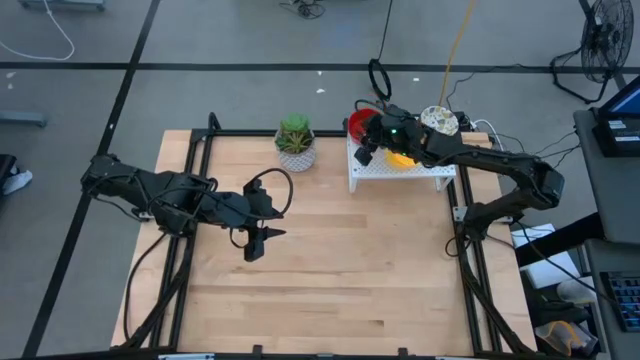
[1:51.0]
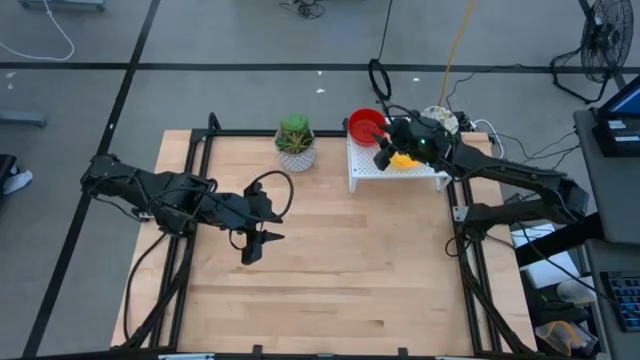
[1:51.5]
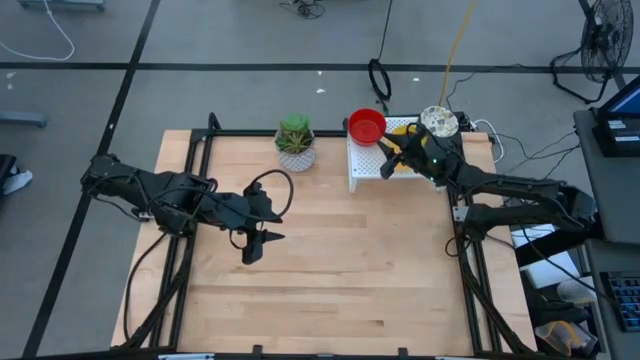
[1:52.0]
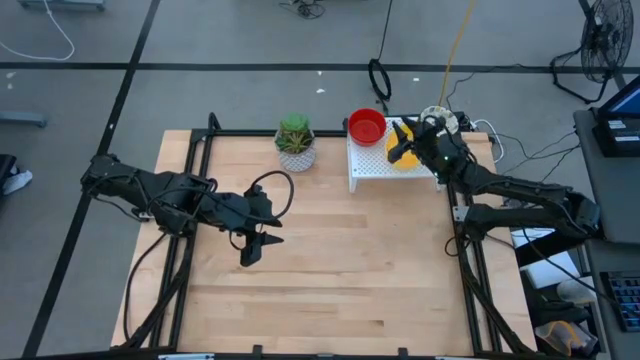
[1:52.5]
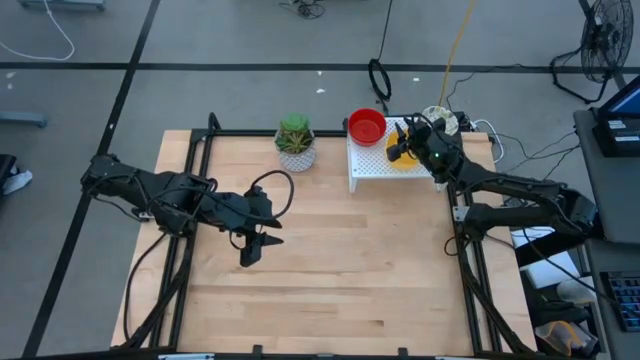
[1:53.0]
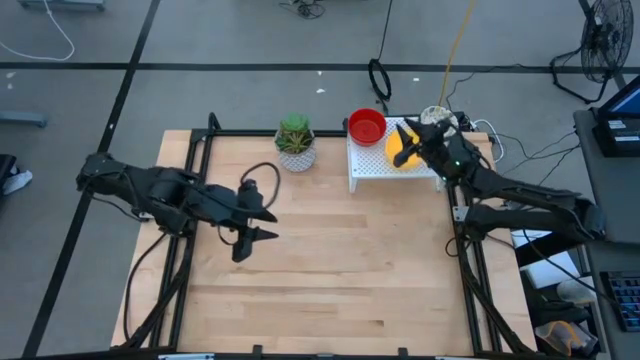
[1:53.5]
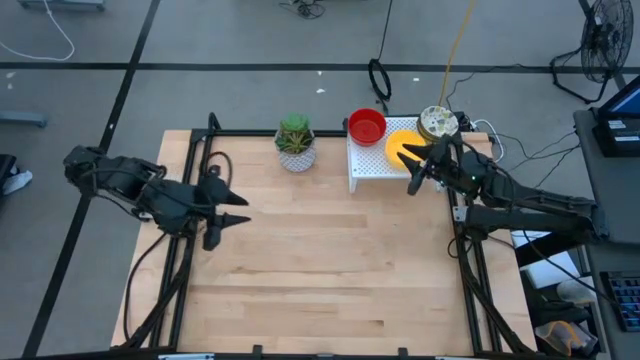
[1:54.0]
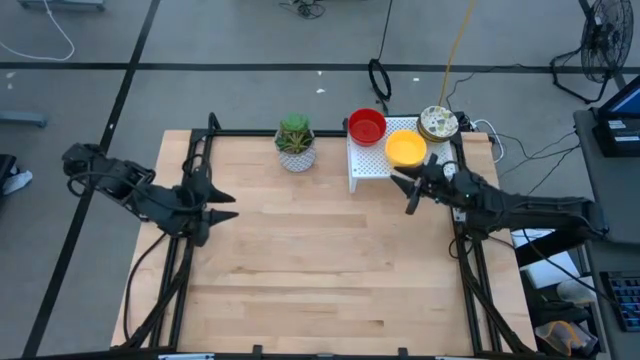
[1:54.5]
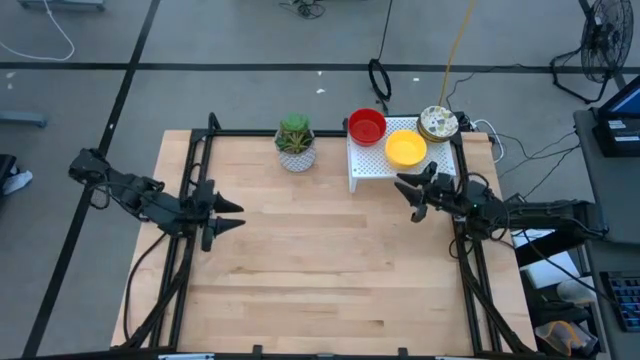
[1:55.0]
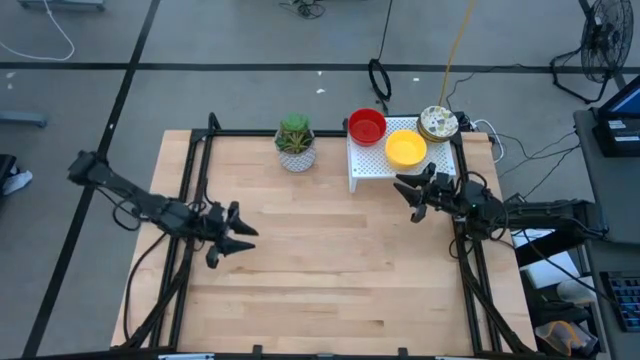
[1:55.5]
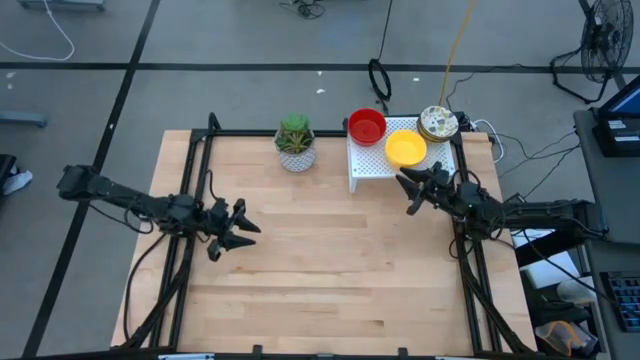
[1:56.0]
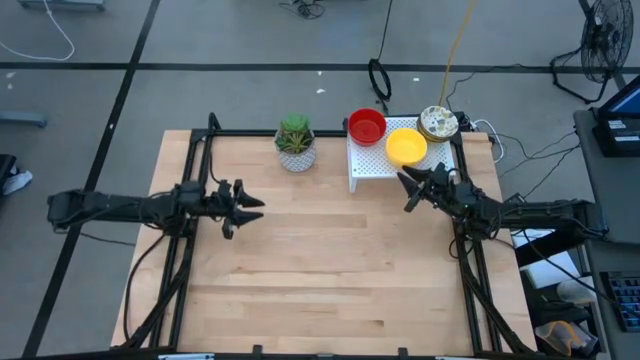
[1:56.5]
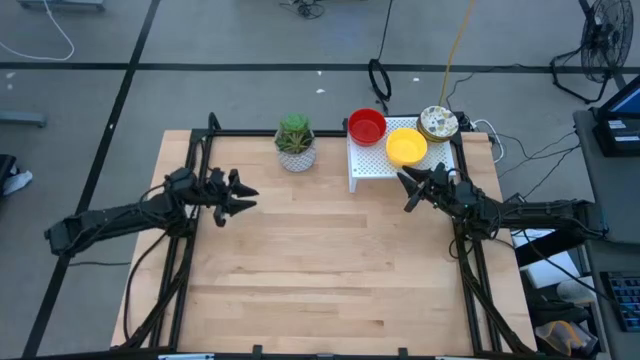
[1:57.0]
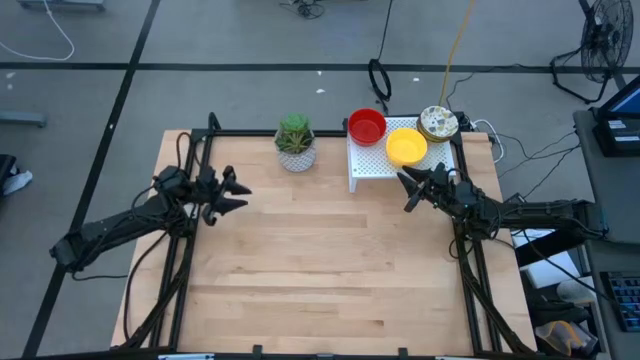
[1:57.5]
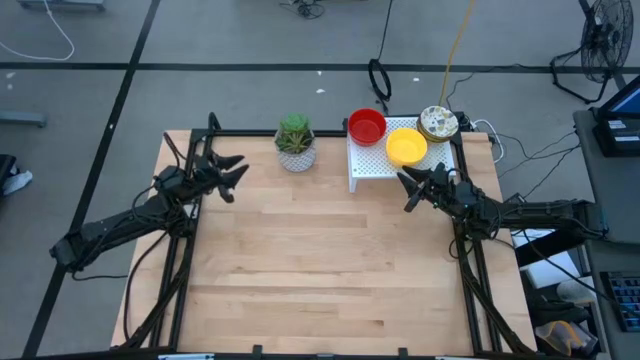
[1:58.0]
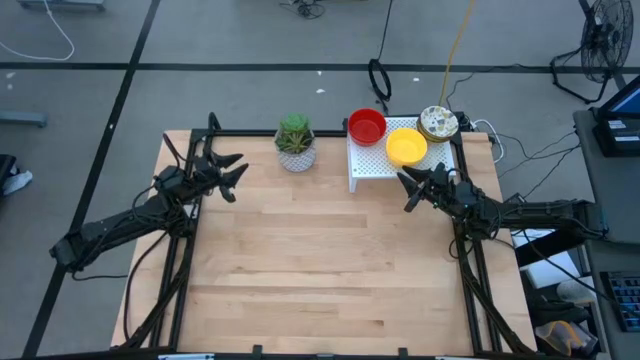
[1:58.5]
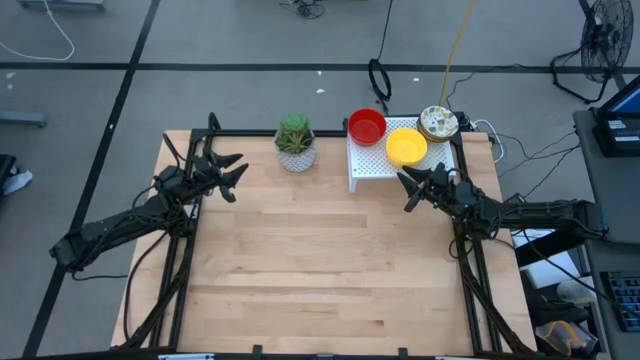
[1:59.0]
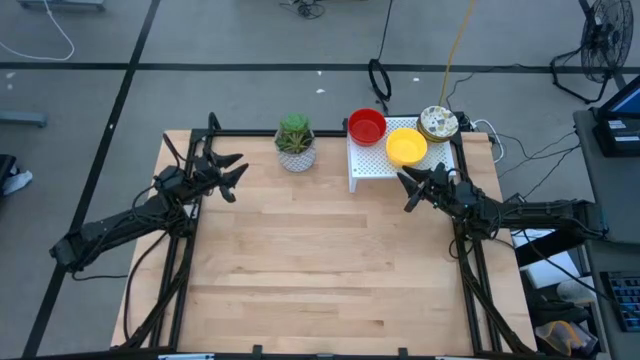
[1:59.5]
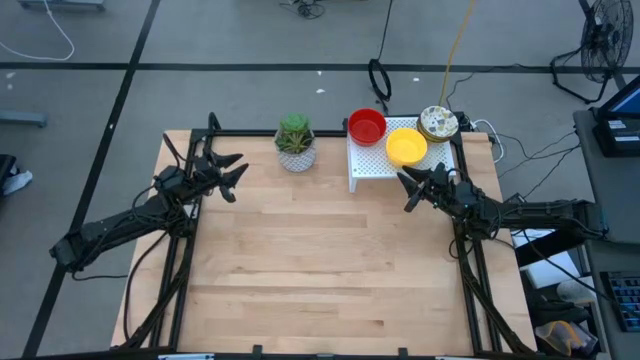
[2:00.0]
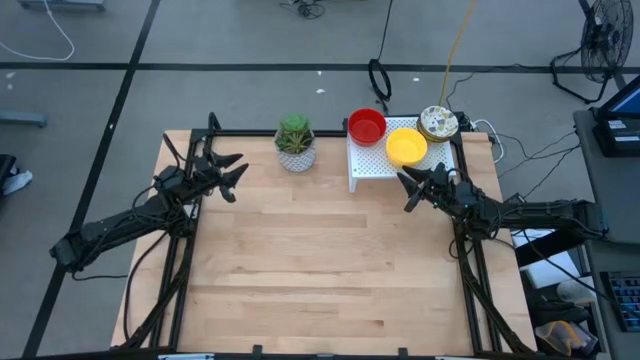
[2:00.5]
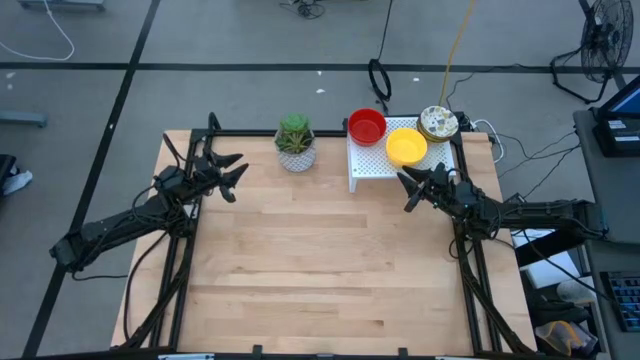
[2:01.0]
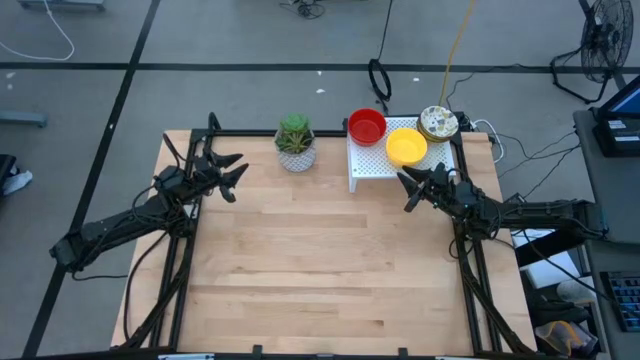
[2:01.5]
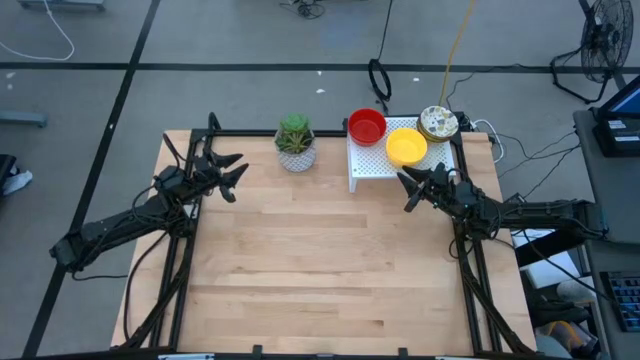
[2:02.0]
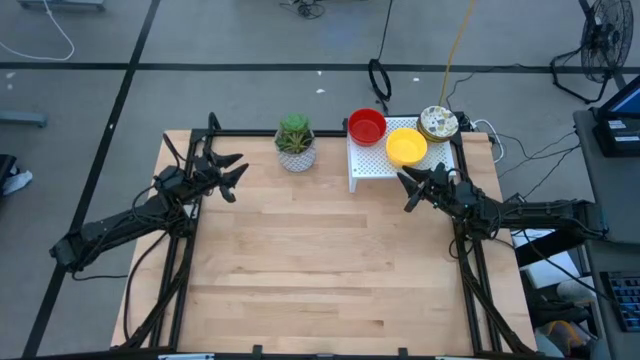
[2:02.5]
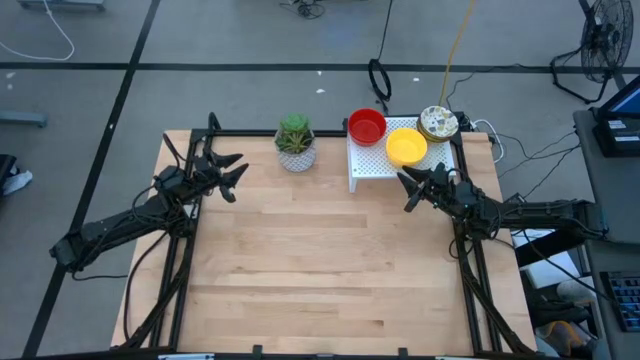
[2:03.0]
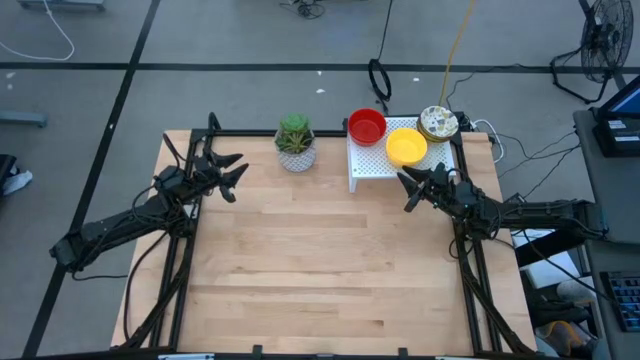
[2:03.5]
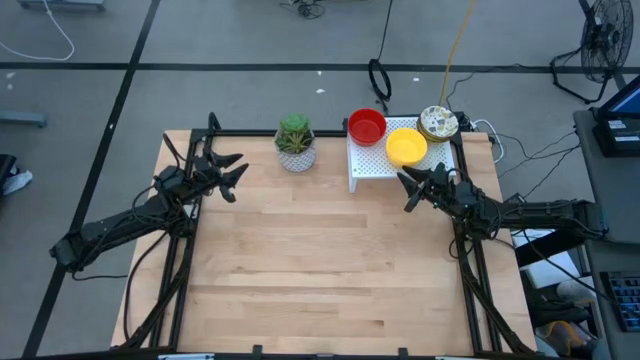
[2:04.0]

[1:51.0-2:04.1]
Task: Pick & Place Mini bowls
Return to Home Position

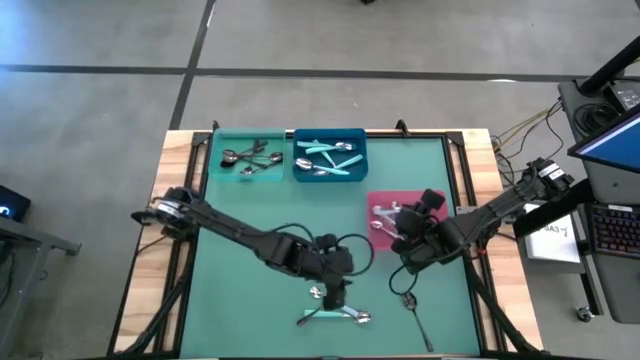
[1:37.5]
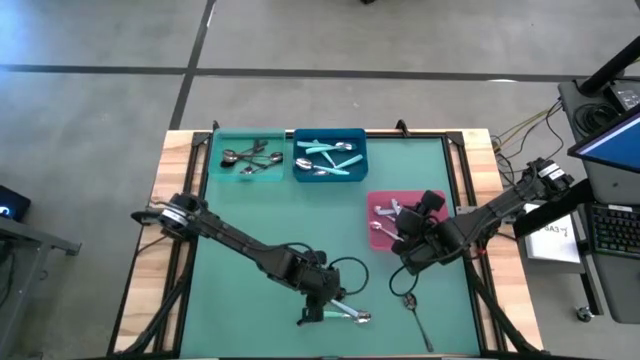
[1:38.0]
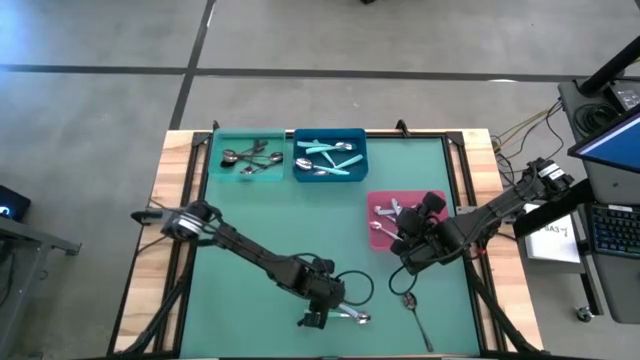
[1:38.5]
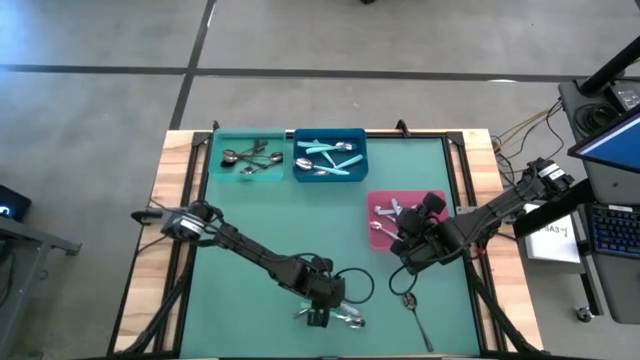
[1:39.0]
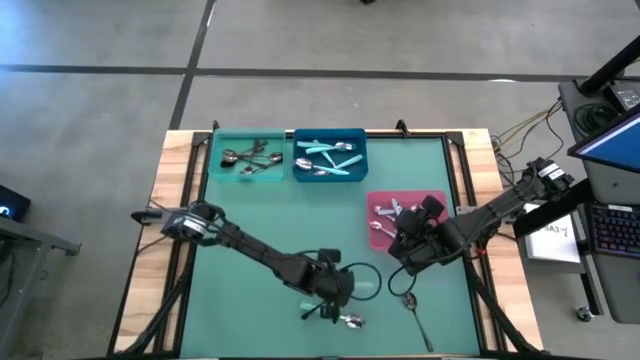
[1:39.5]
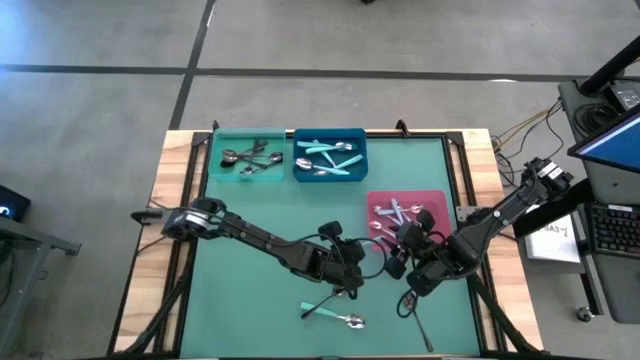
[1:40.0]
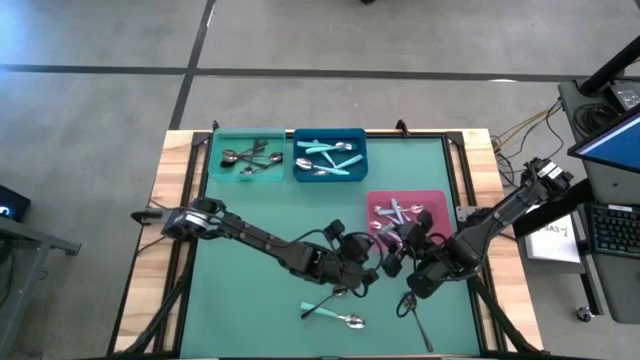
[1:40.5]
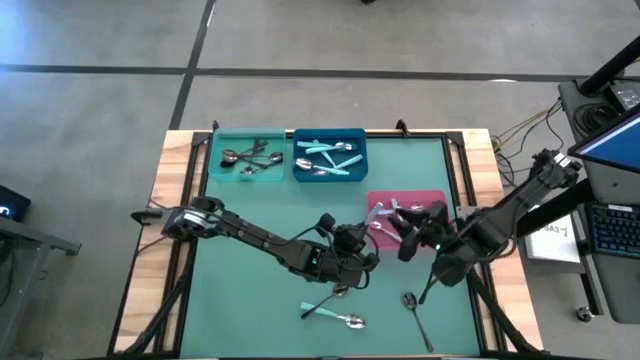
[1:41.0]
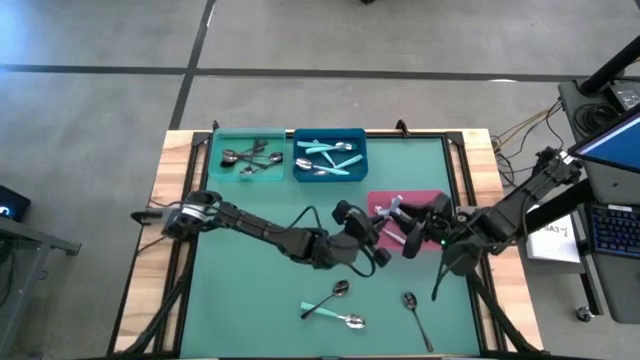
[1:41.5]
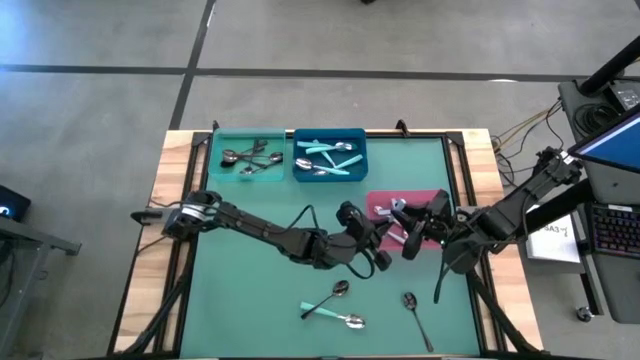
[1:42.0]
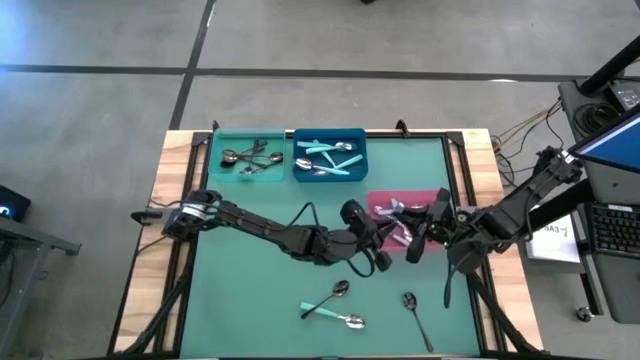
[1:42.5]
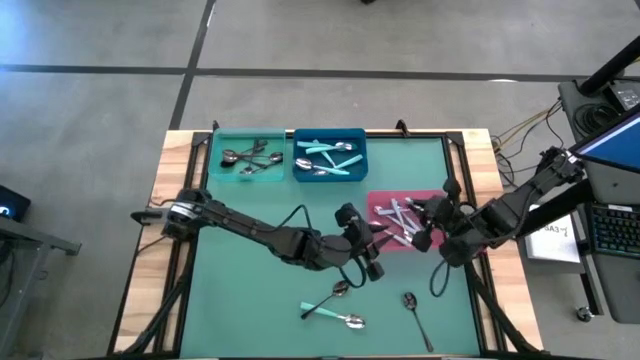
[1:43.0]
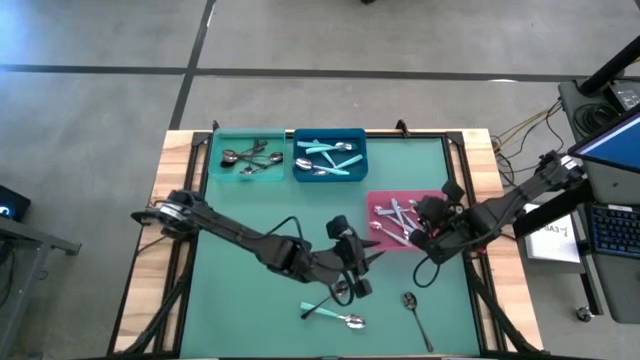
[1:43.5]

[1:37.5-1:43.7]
Task: Sort silverware by color (type)
Put the blue spoon into the red bin

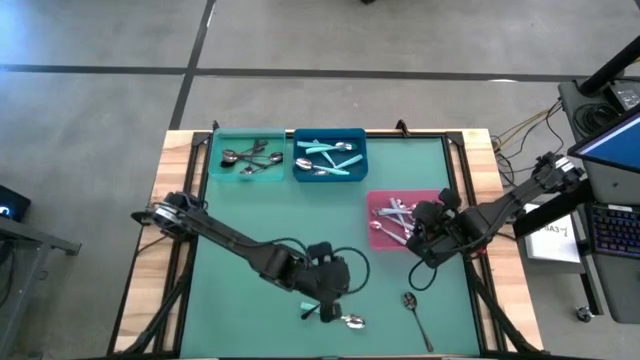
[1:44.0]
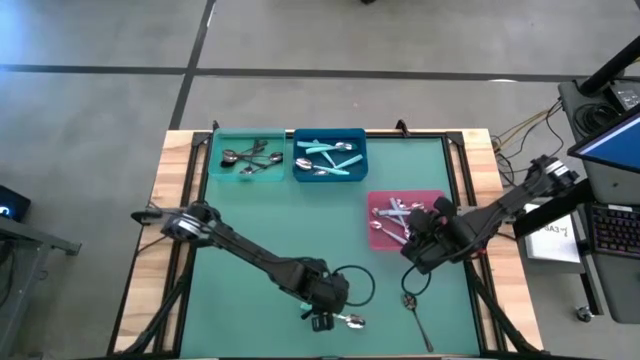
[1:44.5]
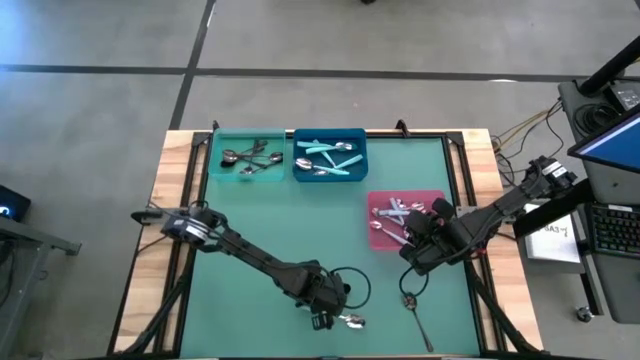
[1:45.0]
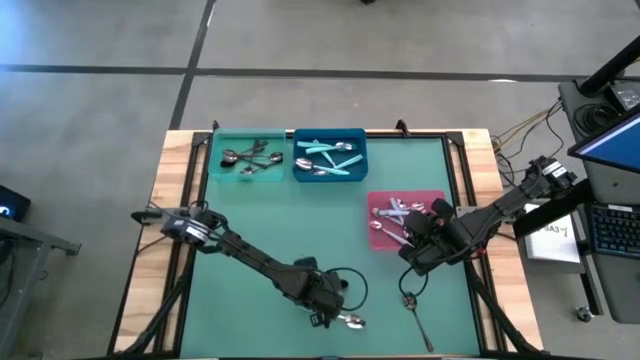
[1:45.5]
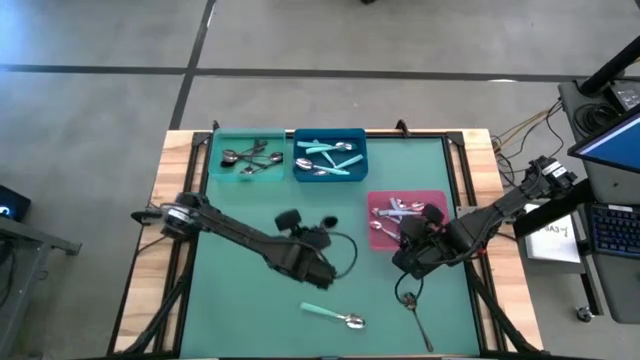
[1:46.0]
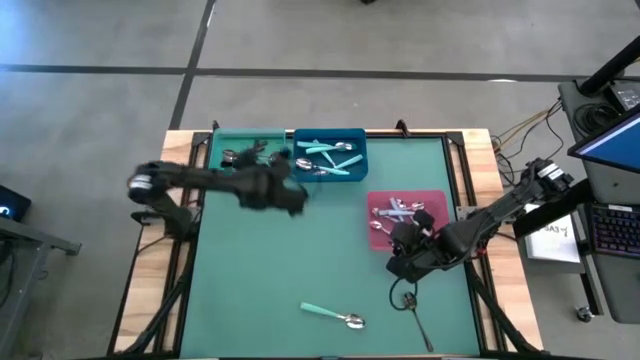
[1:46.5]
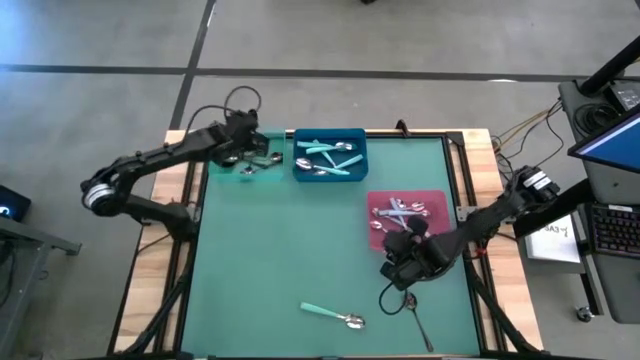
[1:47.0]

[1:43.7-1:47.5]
Put the black spoon into the green bin
